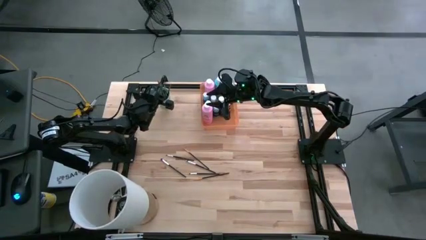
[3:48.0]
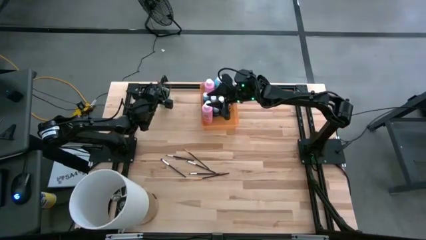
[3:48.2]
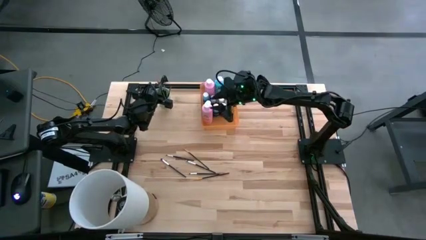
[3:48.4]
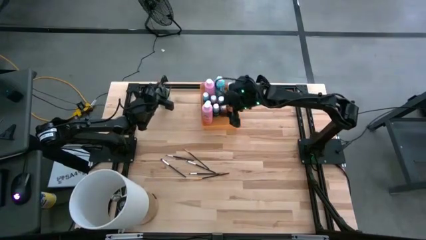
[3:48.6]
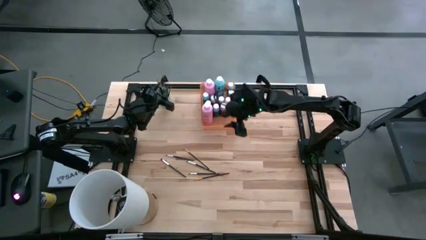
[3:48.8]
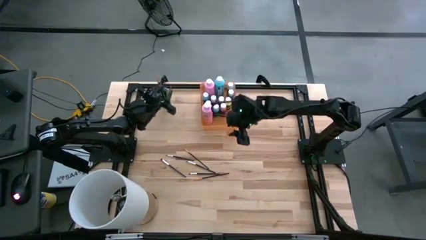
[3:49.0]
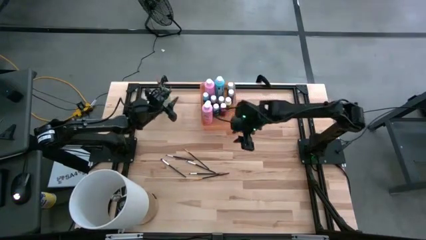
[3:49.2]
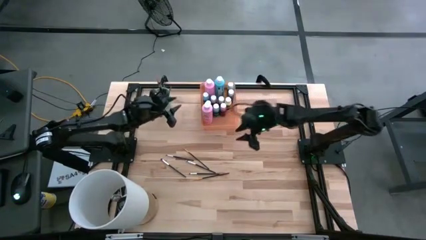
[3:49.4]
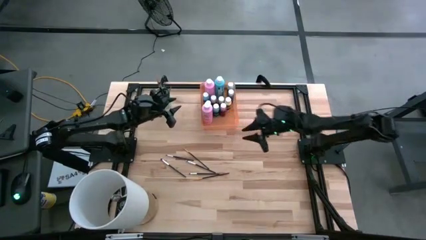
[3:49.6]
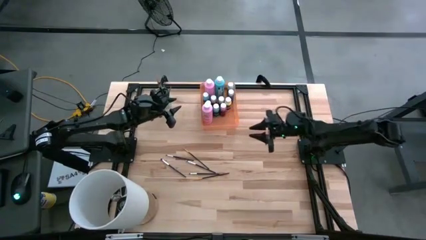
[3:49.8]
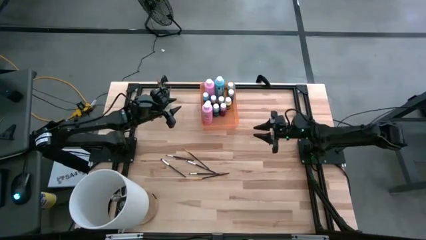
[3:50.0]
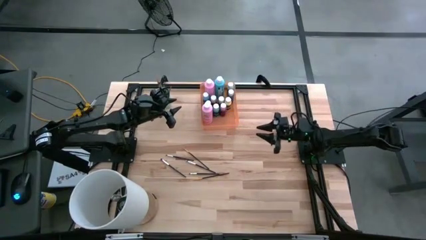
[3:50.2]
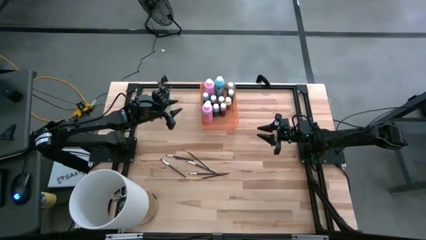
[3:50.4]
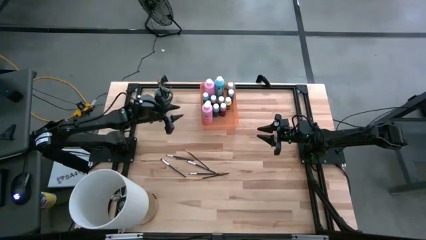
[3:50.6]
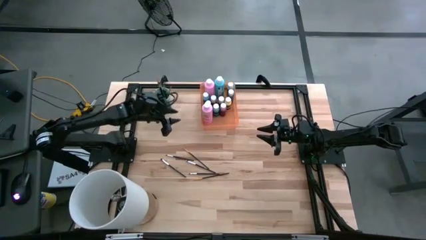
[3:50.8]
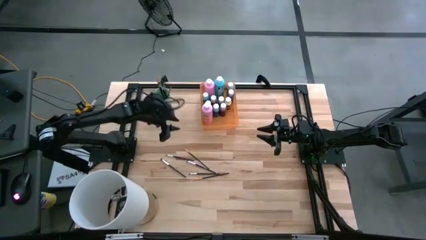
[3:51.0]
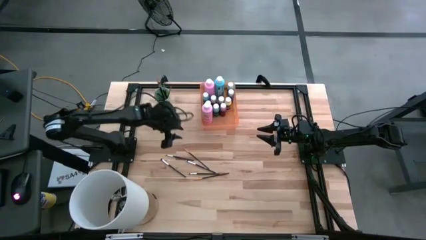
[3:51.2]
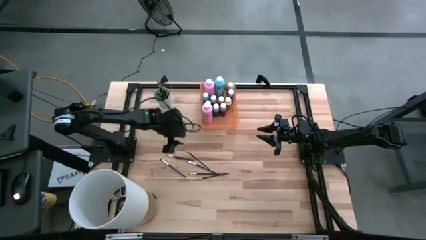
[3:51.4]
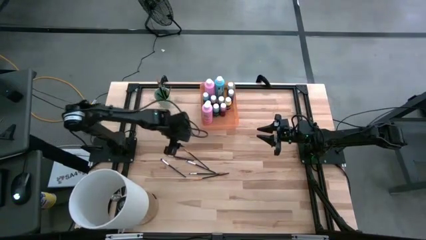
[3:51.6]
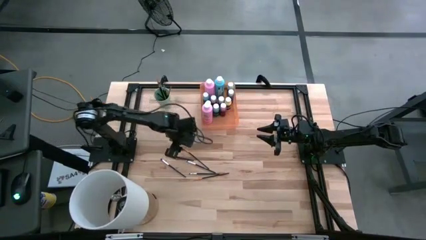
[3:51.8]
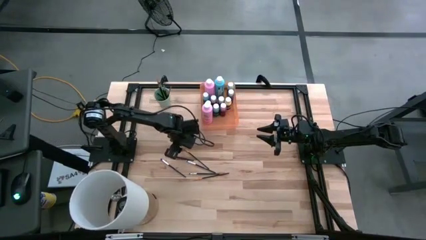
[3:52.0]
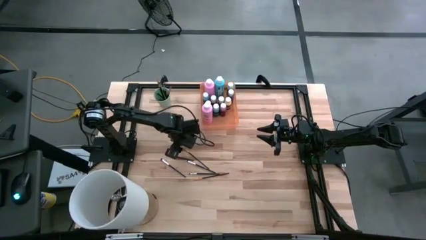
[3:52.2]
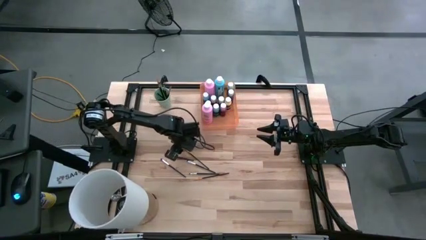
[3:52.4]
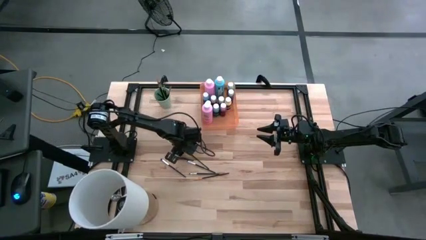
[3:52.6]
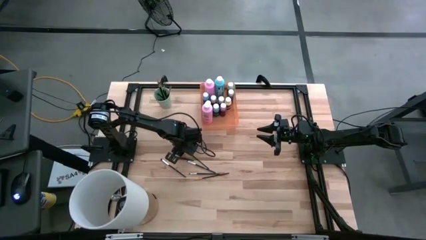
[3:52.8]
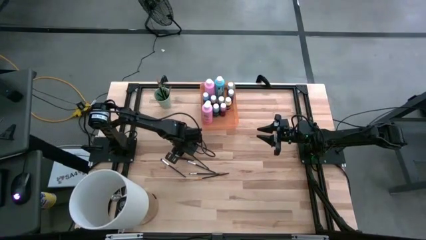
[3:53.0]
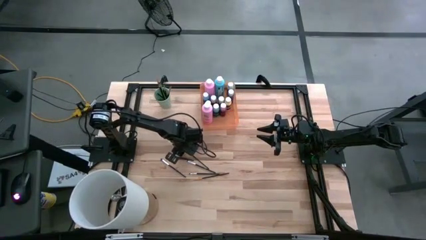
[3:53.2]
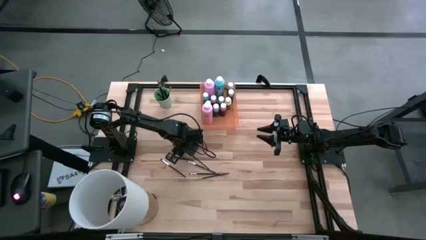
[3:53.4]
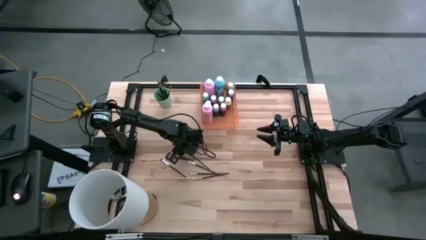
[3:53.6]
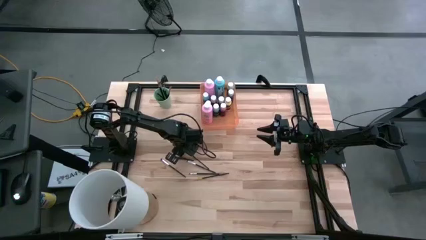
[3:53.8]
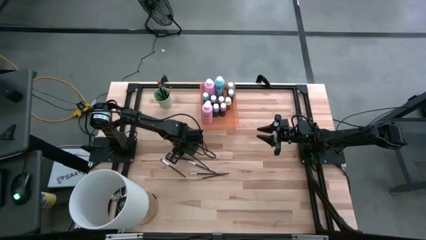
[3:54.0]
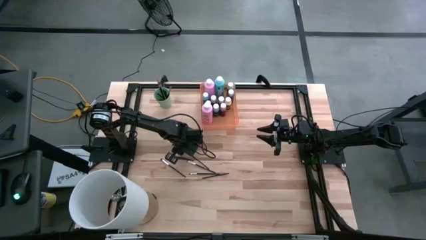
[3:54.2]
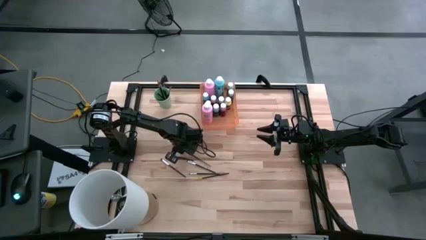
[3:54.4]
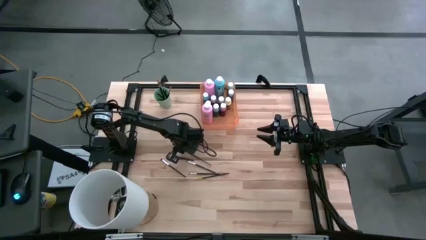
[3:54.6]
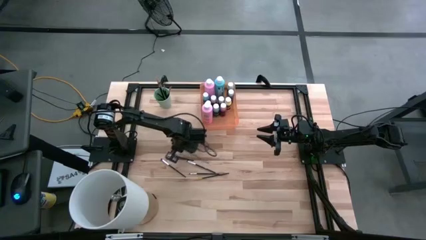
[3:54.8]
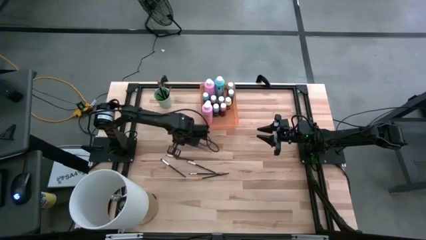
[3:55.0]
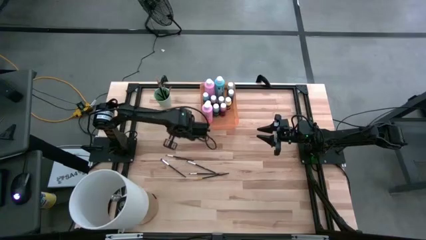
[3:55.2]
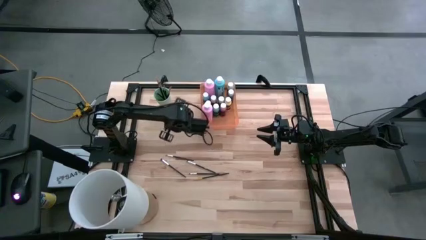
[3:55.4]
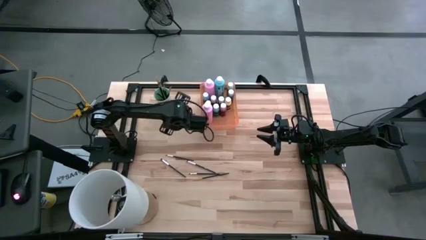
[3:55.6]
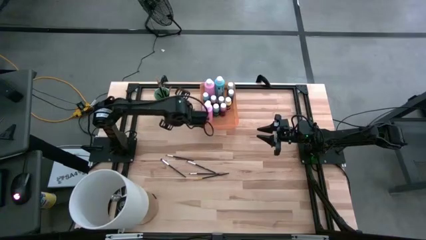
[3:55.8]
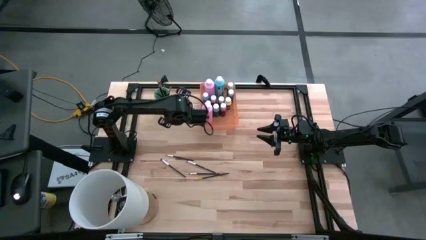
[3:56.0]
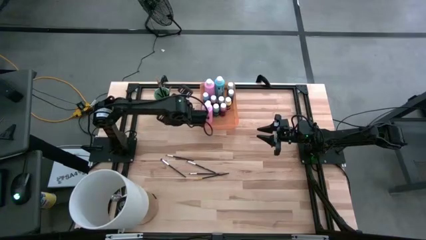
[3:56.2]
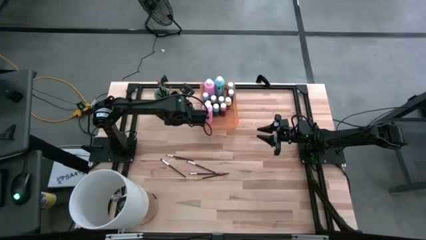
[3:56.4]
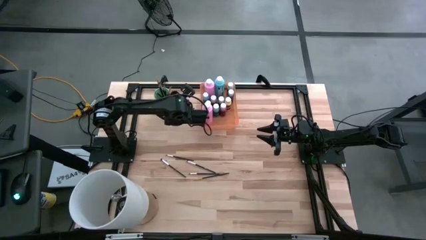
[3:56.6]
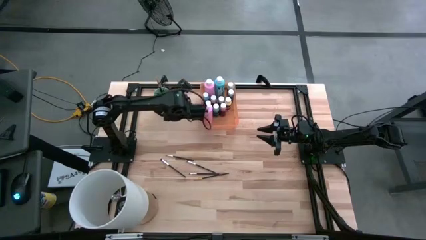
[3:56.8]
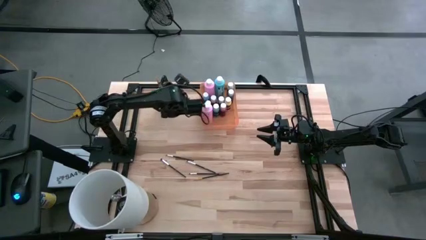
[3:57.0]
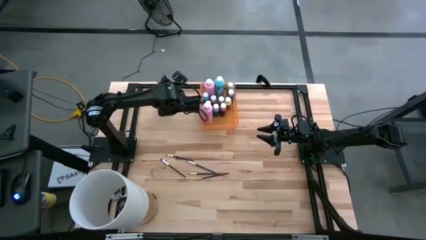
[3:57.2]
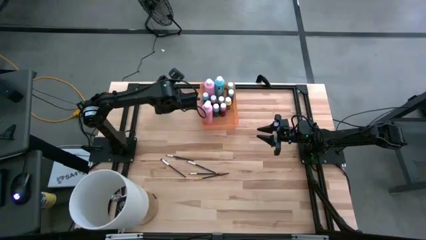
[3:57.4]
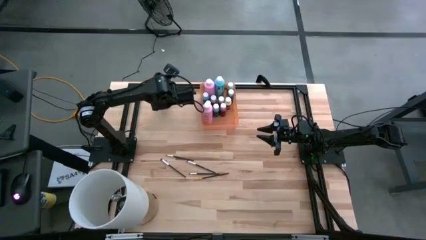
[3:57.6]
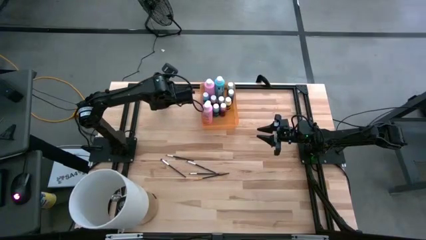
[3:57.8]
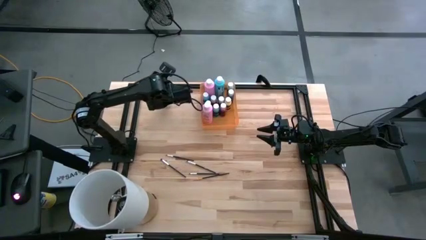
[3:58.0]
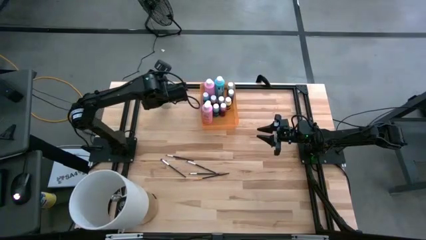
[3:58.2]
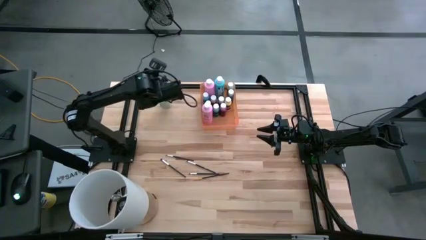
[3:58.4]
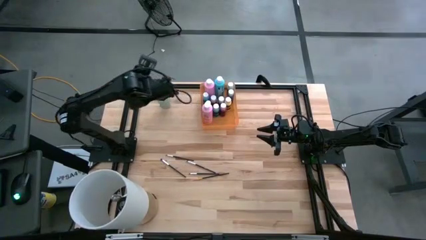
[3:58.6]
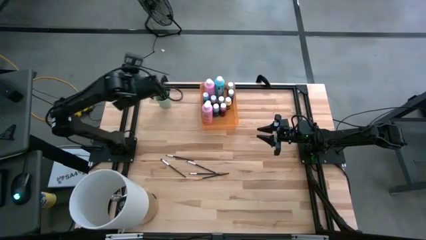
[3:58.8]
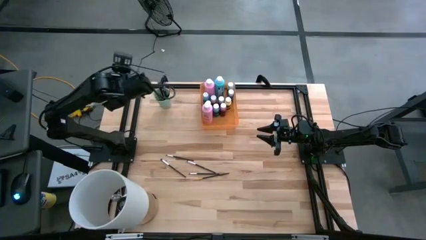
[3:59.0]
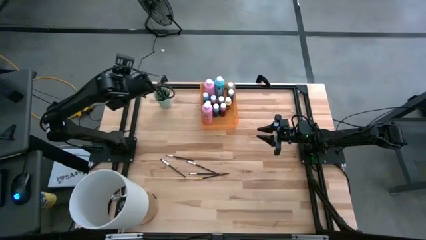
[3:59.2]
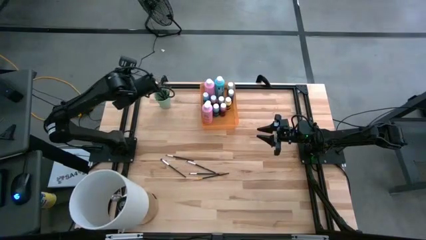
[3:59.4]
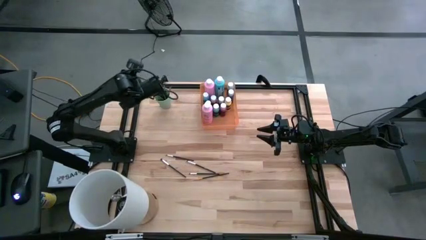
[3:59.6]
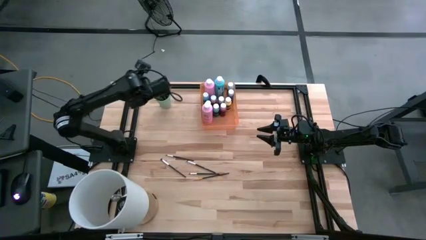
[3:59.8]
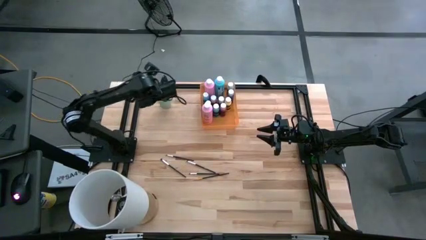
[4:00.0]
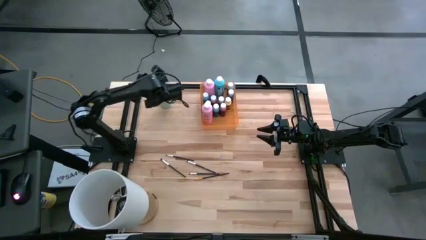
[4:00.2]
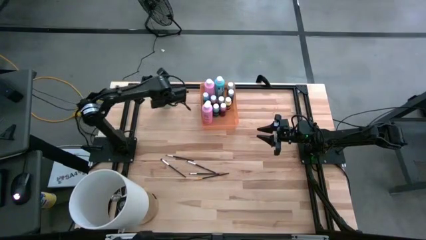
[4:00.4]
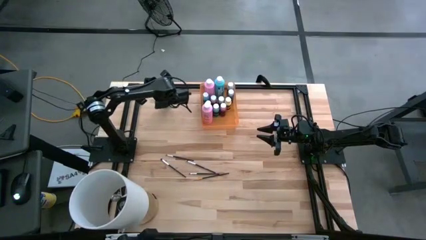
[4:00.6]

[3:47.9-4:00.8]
Task: Pick & Place Paint Supplies
Put the orange paintbrush into the cup
